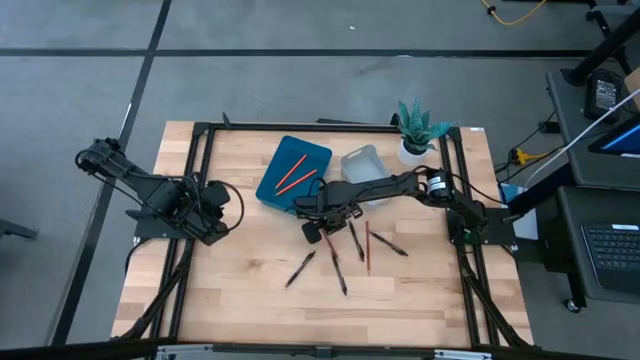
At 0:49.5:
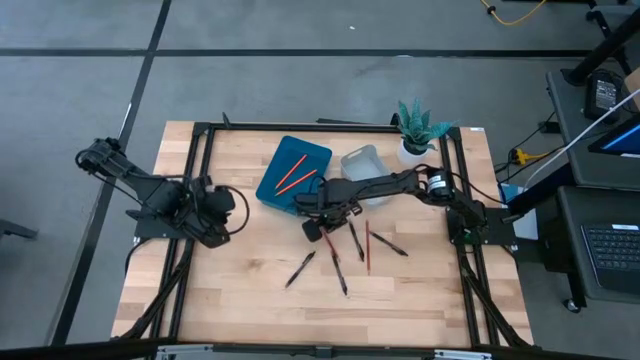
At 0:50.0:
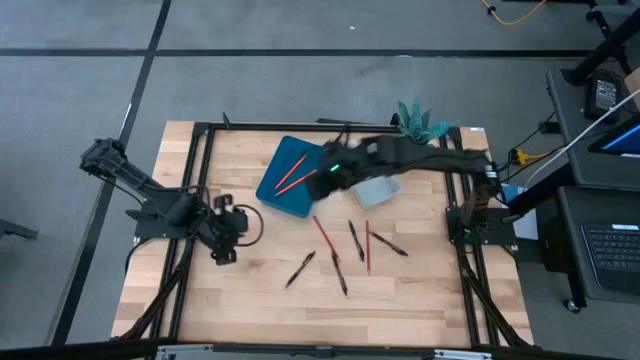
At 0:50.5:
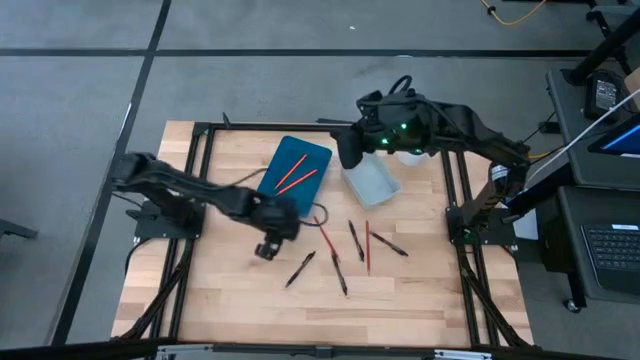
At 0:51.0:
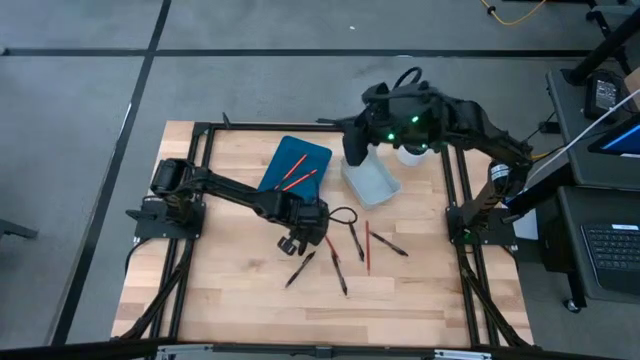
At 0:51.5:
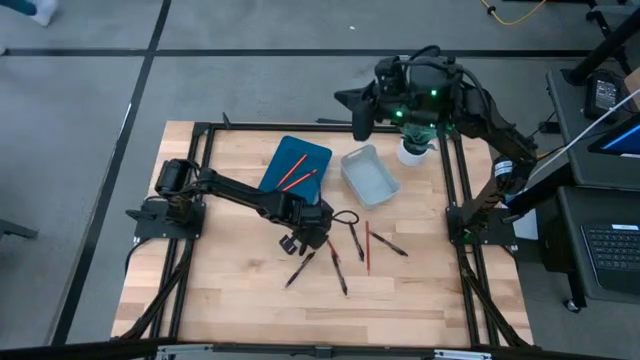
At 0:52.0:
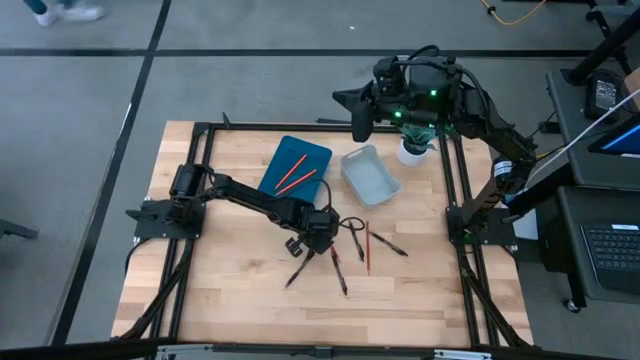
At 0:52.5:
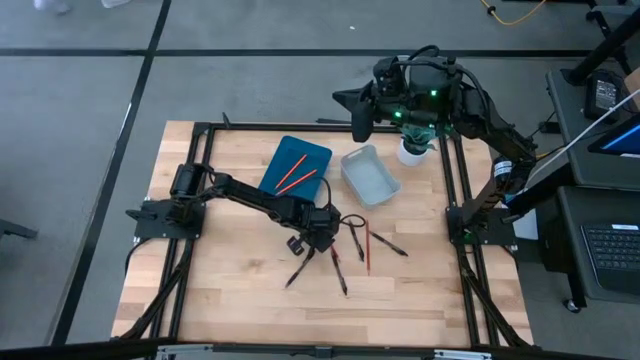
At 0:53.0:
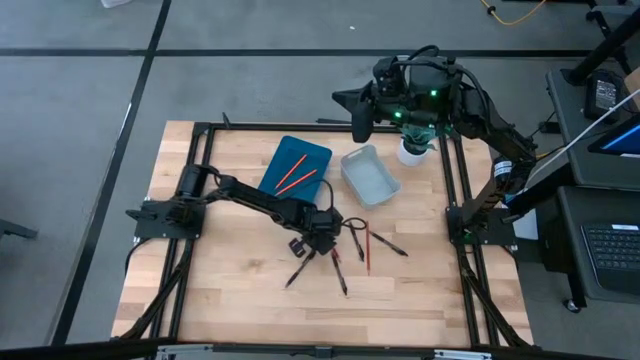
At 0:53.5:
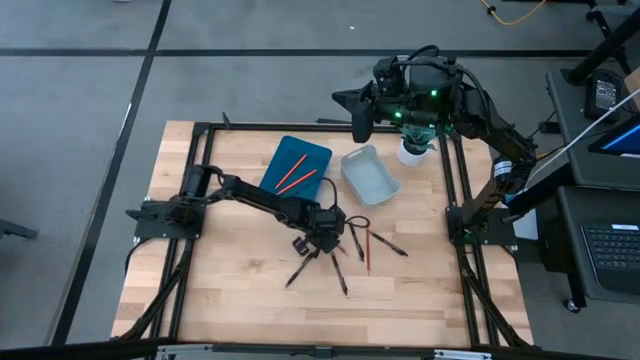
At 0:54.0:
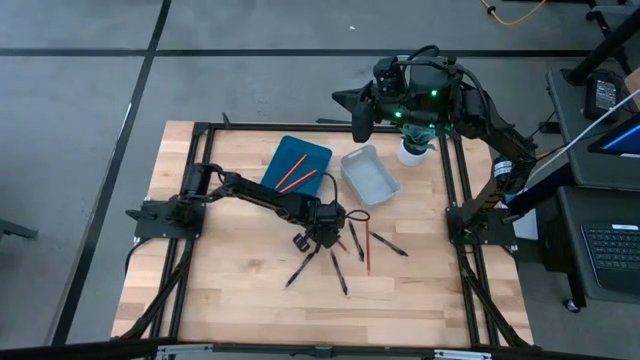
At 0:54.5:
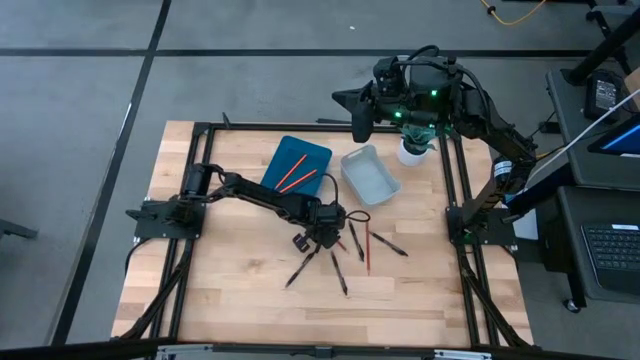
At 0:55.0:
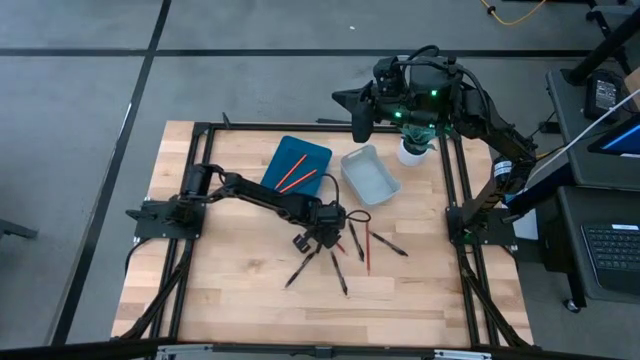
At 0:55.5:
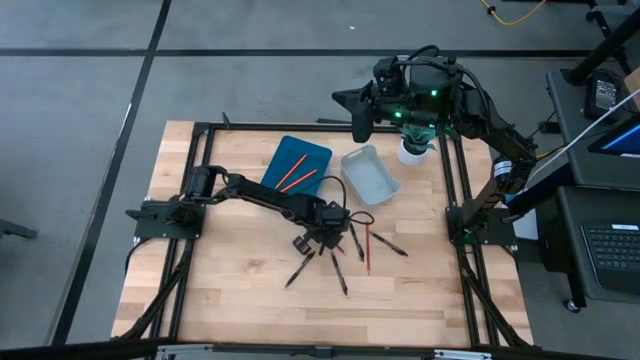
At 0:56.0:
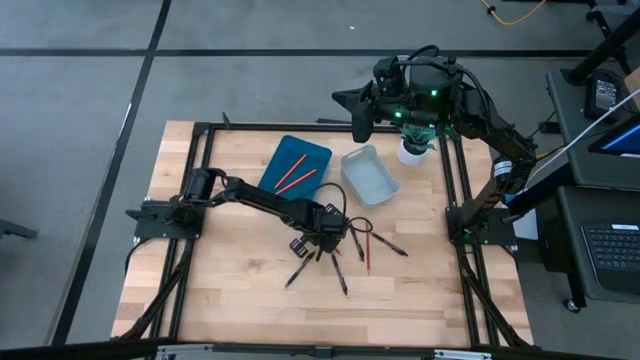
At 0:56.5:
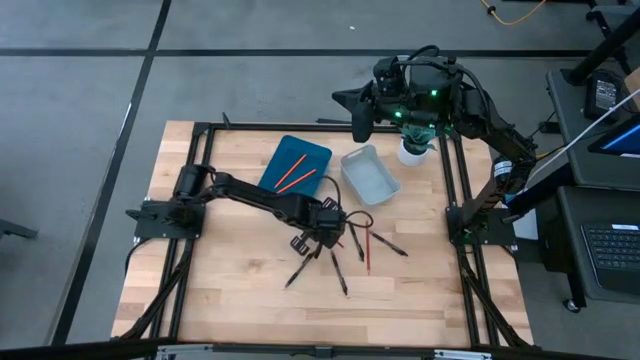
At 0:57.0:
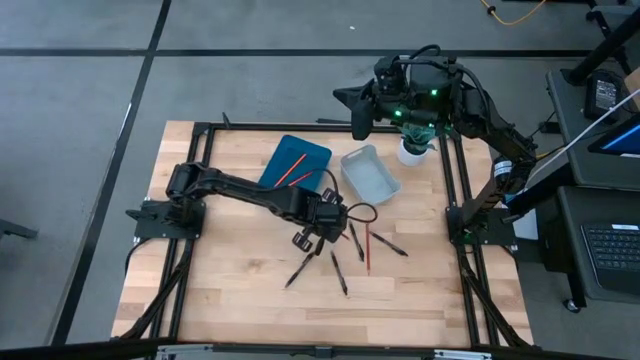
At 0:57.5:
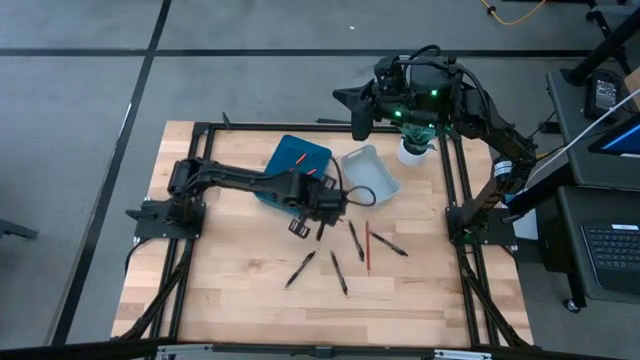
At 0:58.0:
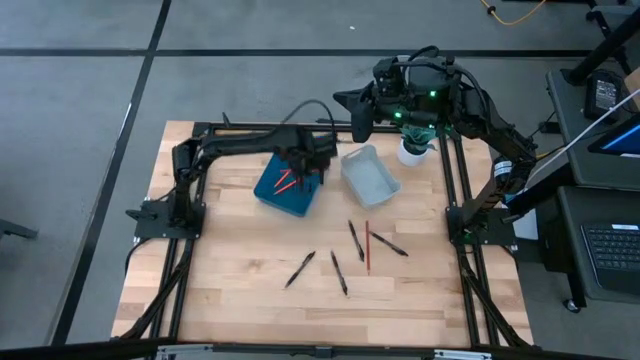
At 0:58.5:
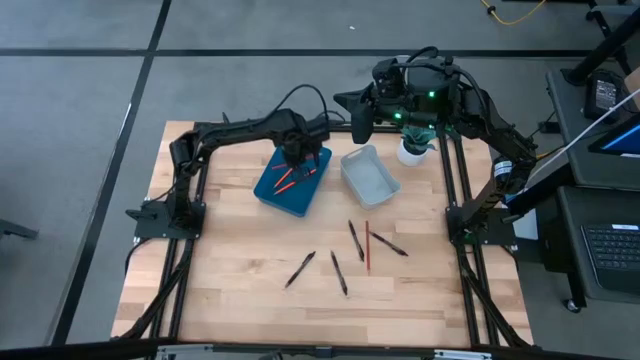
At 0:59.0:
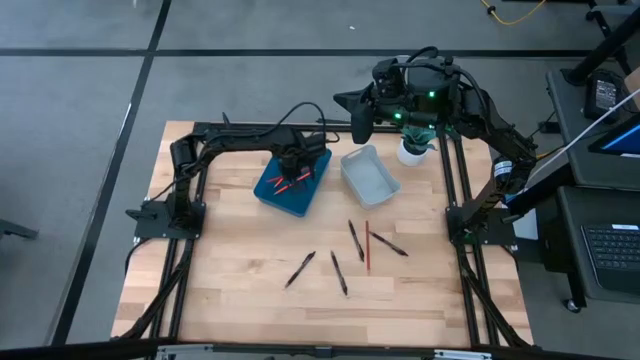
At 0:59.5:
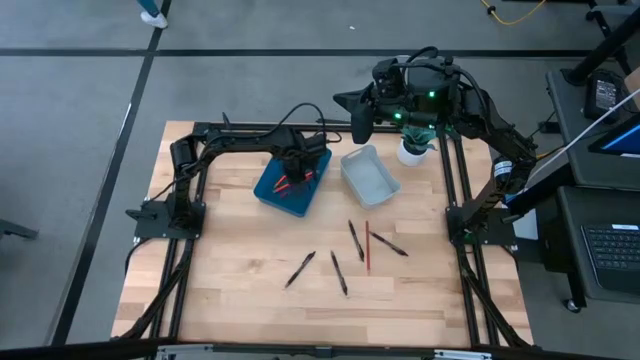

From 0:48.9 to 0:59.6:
Task: Sort pens & pencils
Put the red pencil into the blue bin

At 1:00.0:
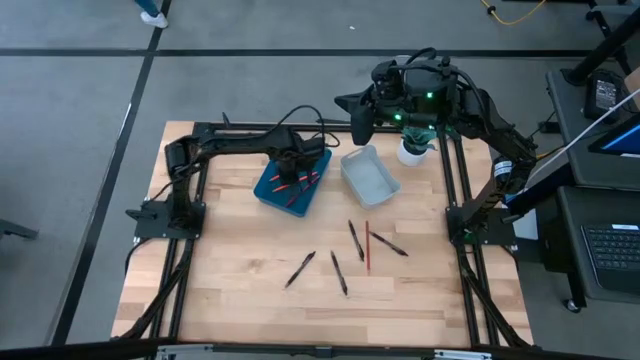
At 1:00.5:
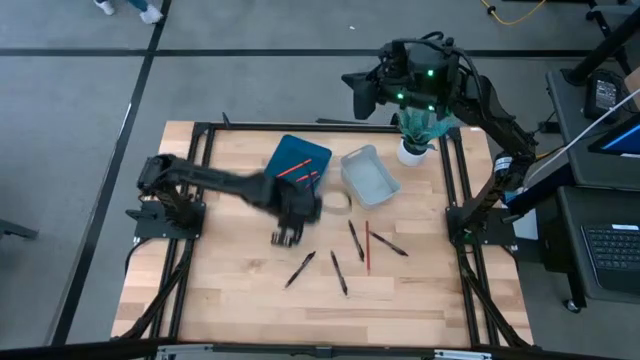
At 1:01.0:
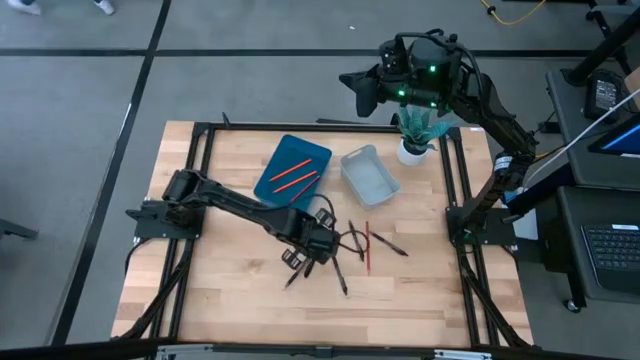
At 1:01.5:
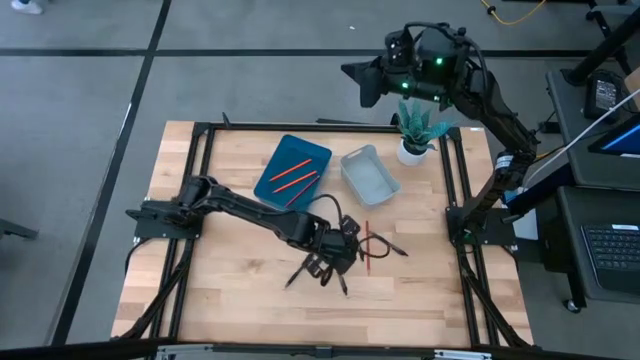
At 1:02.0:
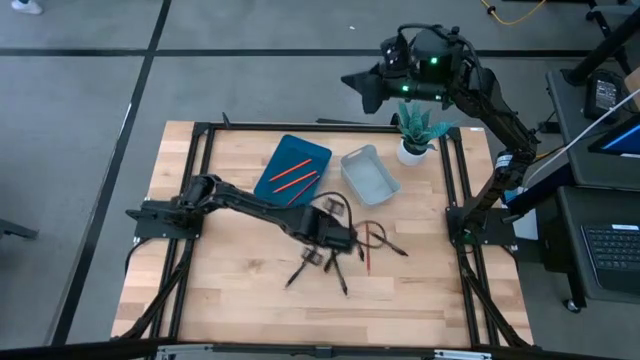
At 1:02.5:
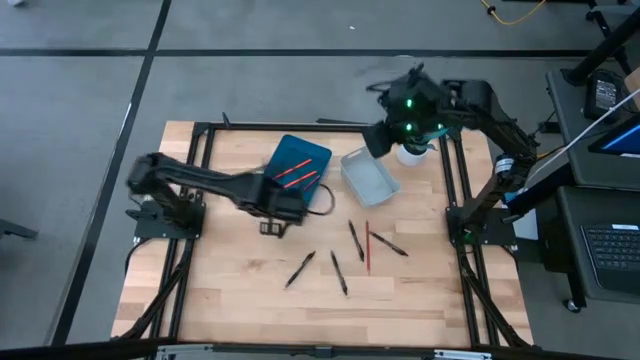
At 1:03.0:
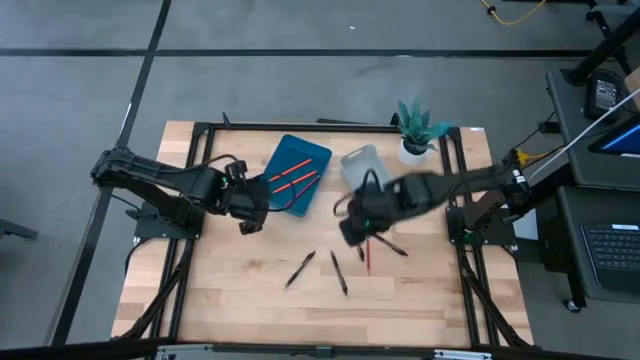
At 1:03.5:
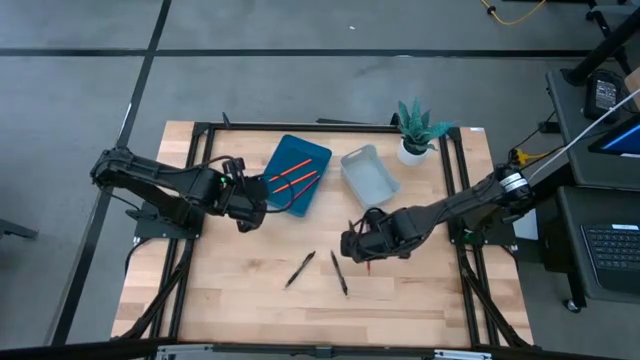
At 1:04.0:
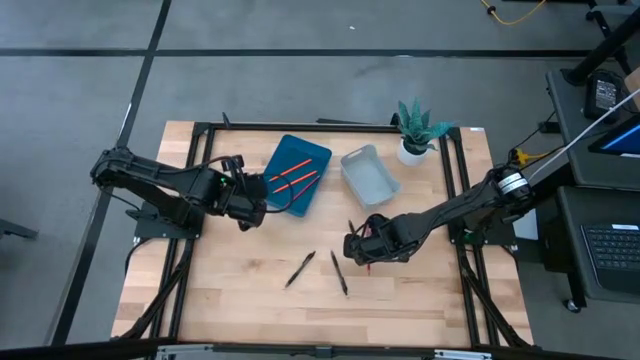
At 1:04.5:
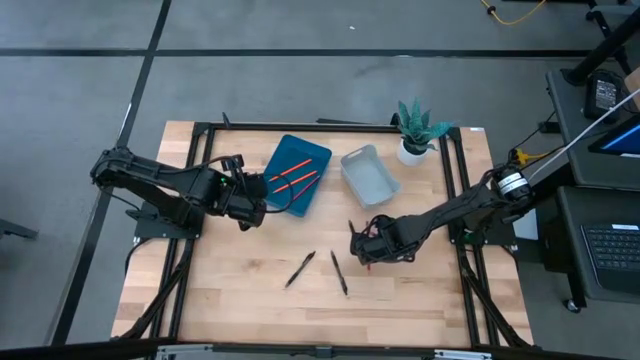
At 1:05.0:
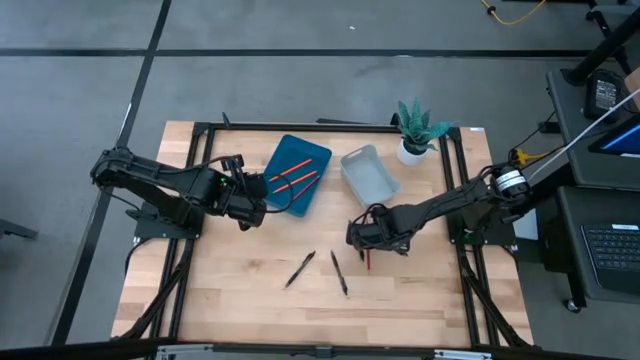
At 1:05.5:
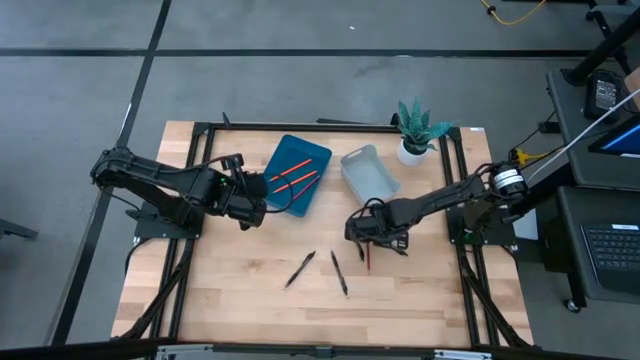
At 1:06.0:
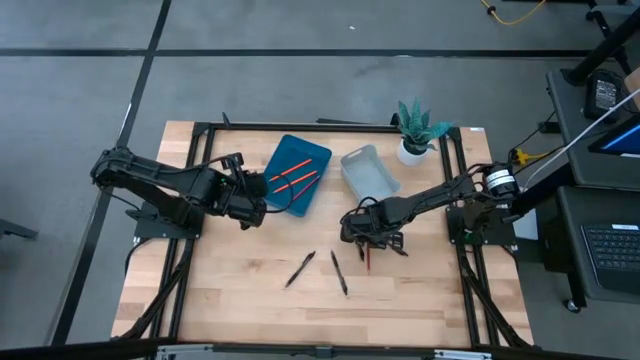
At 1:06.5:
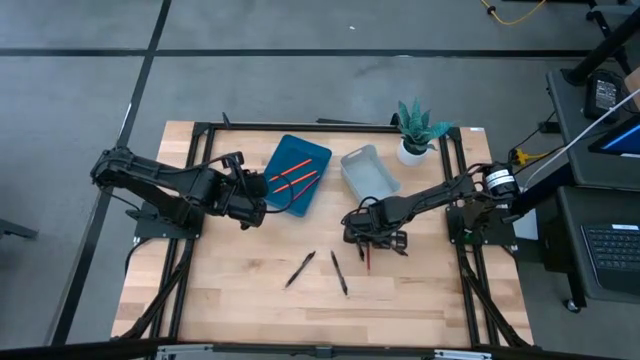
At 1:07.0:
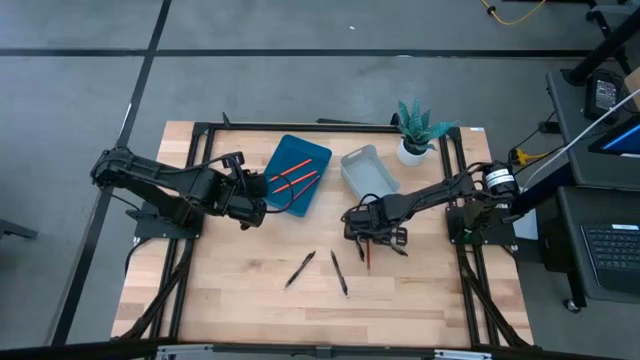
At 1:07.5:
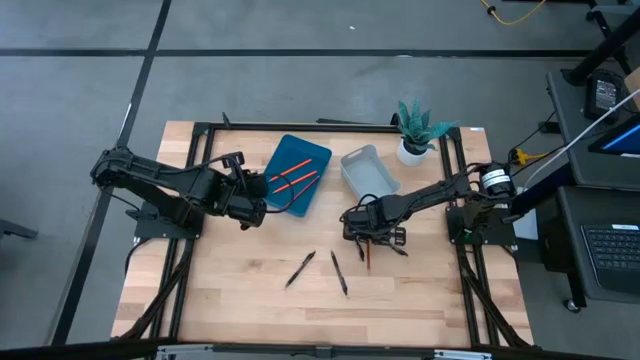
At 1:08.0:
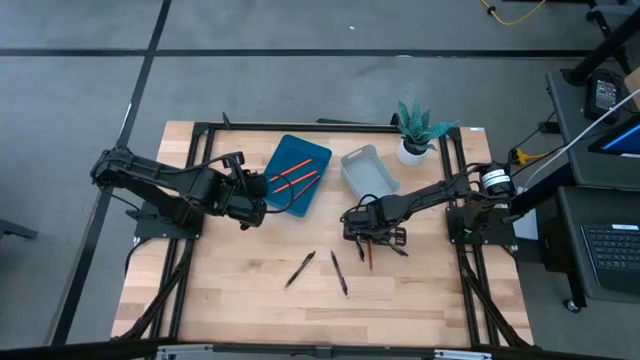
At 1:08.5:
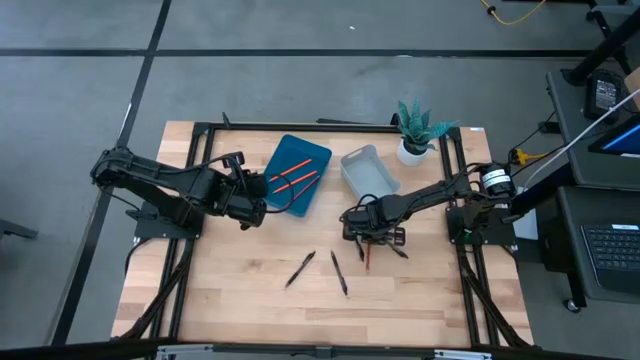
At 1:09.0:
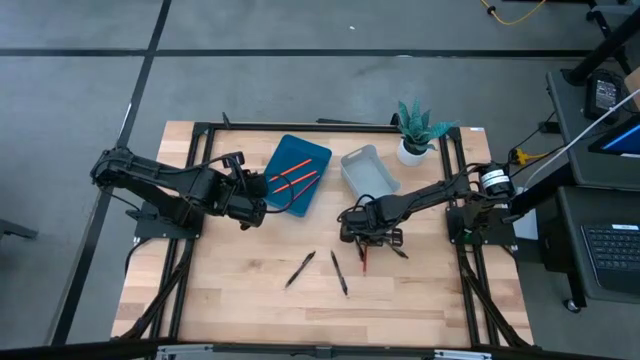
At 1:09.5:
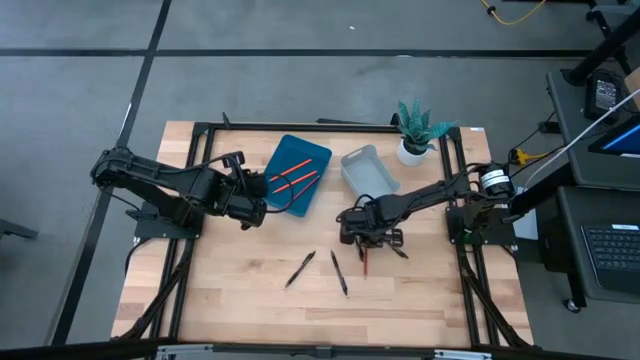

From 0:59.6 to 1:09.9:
Put the red pencil into the blue bin

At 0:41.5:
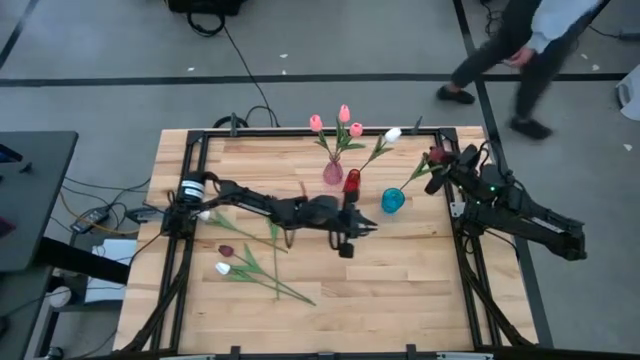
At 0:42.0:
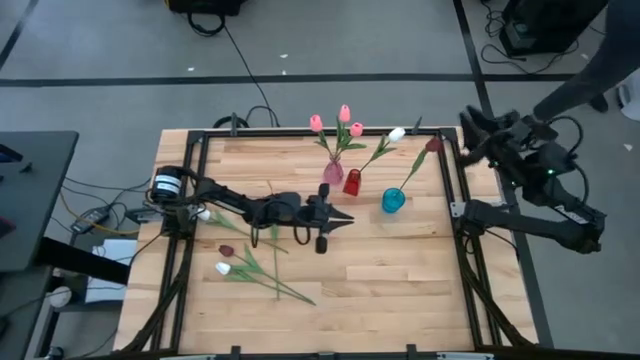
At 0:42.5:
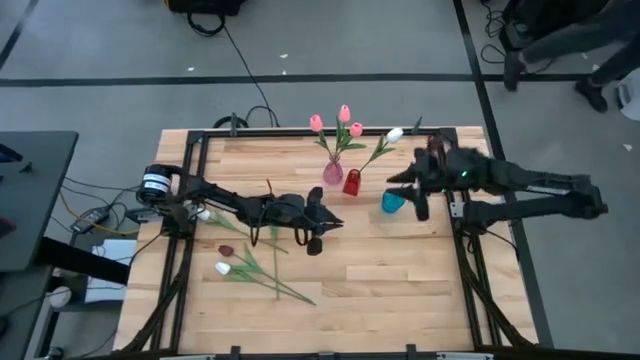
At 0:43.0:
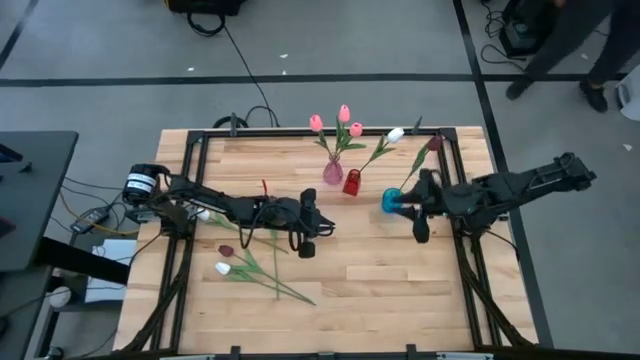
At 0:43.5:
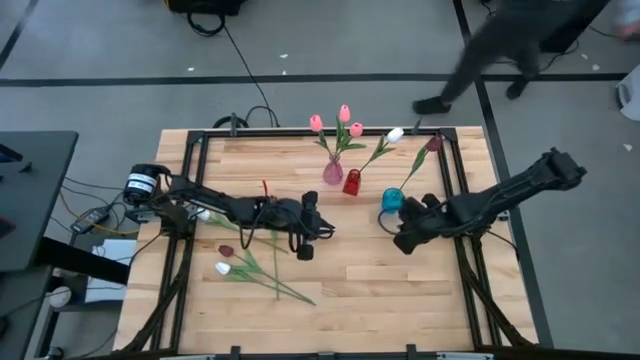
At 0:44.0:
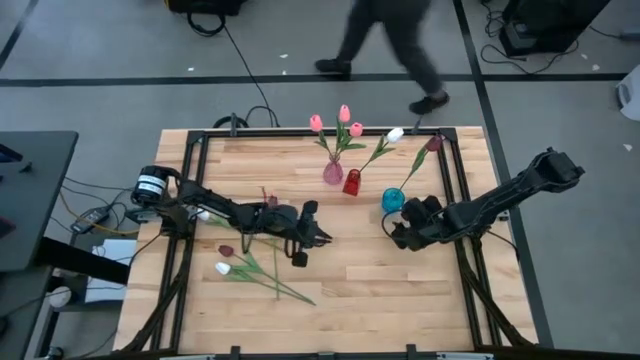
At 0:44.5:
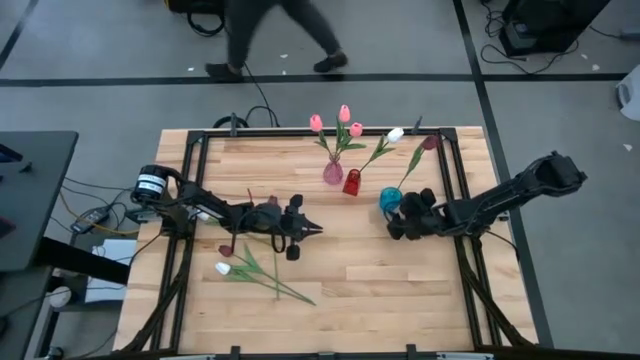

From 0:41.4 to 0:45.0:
Task: Sort flowers into vase by color
Adjust the blue vase
